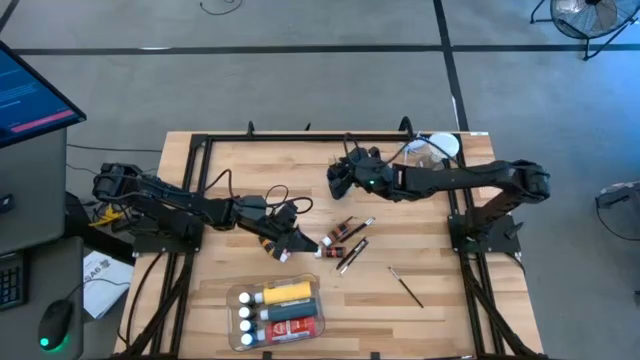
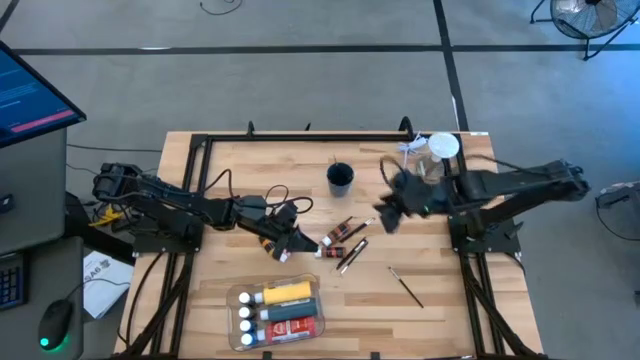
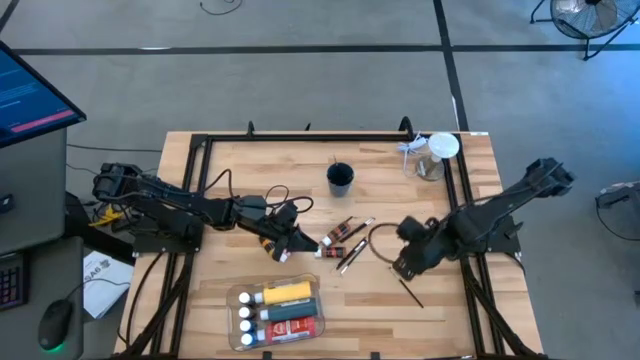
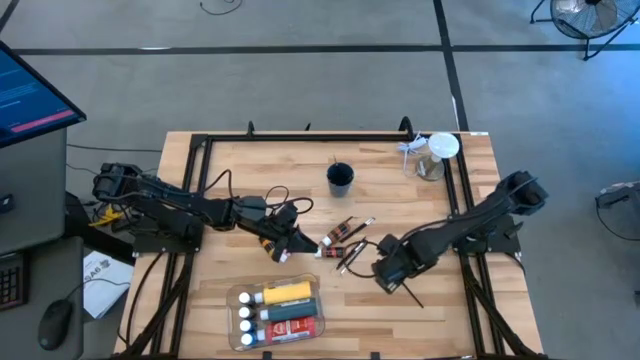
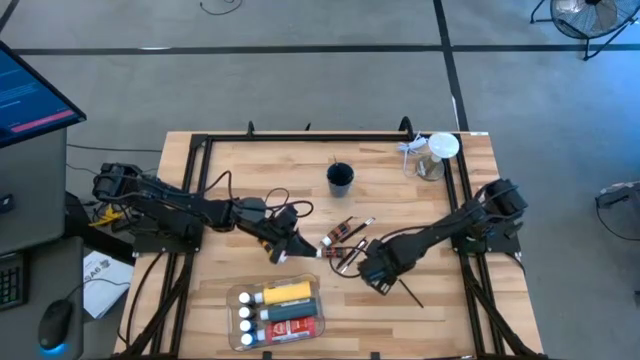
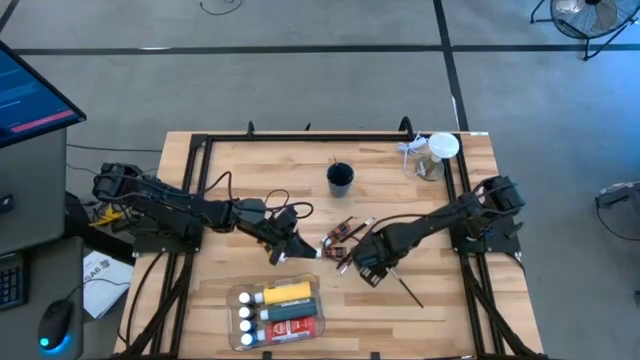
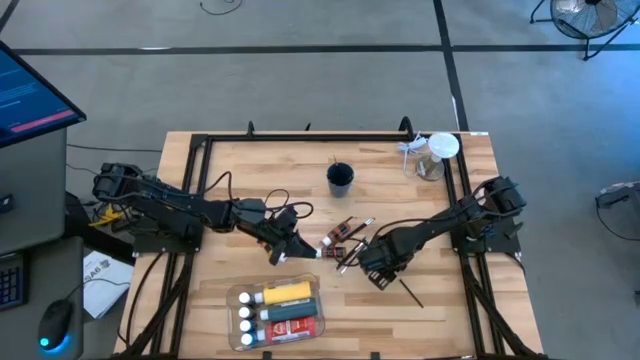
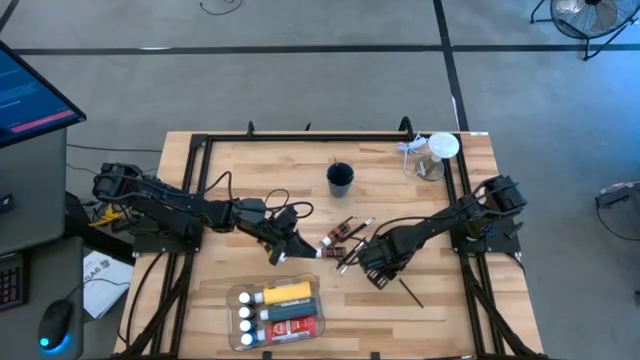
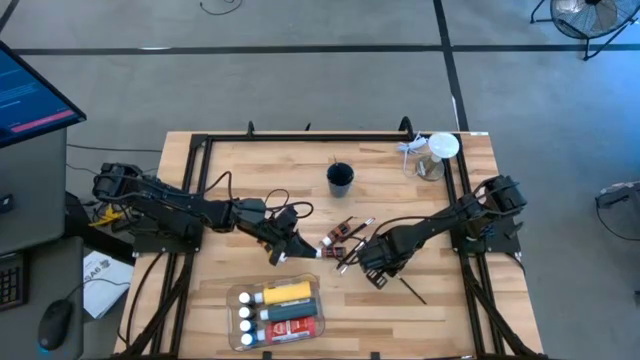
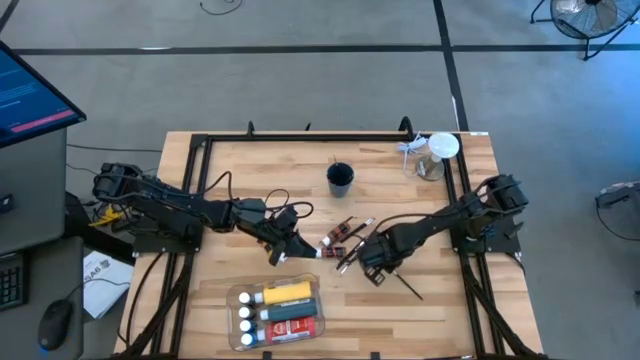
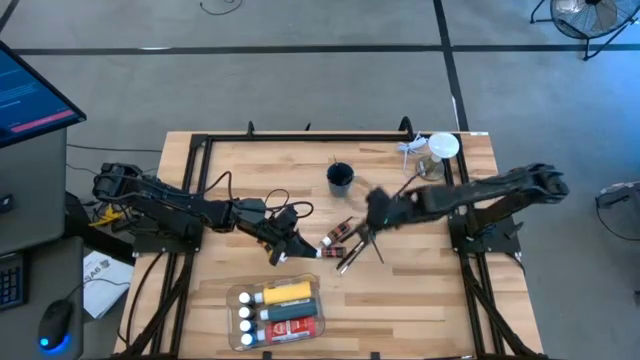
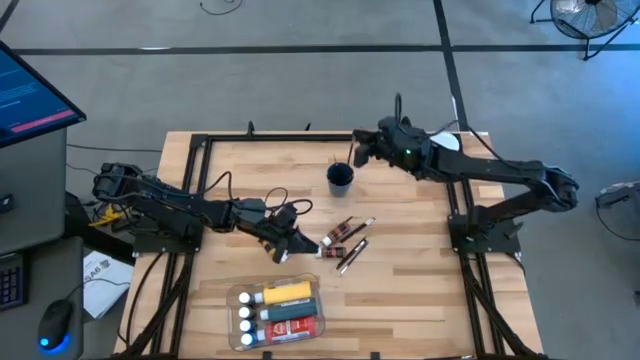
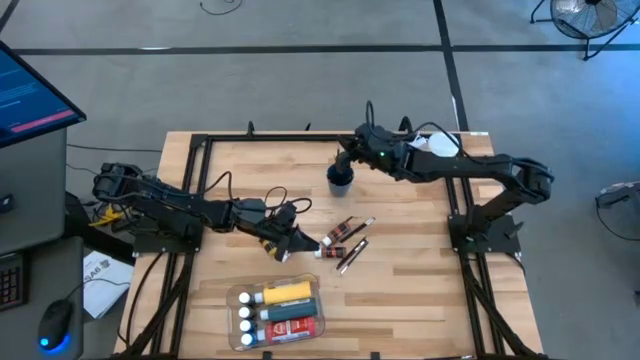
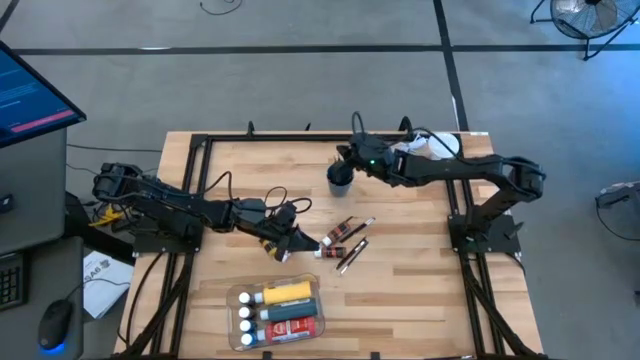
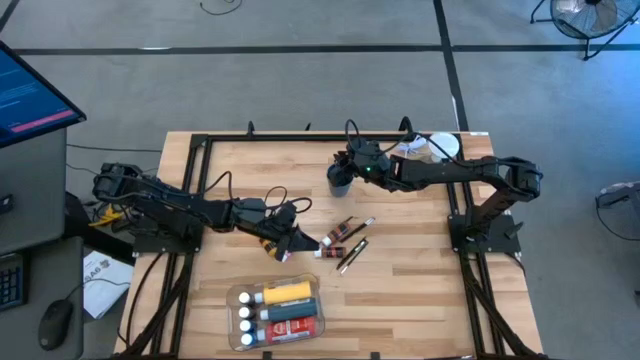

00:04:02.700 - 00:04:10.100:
Task: Pick & Place Paint Supplies
Put the paint brush into the blue cup

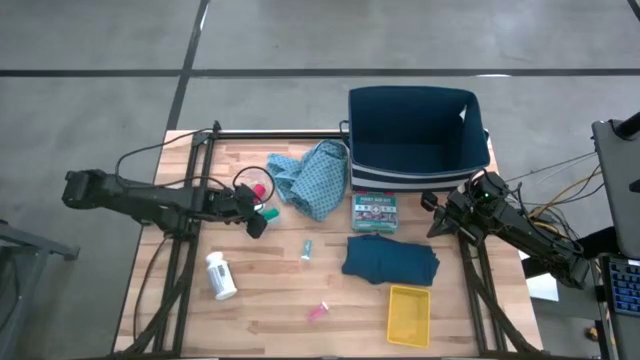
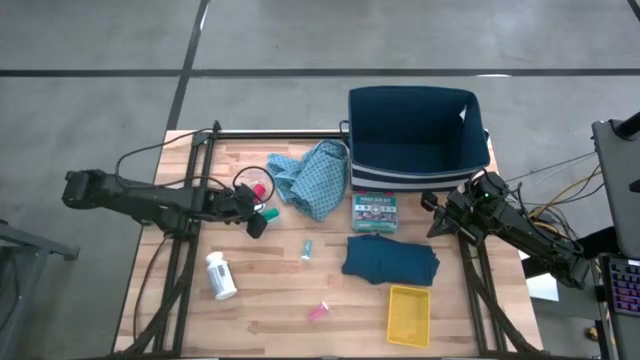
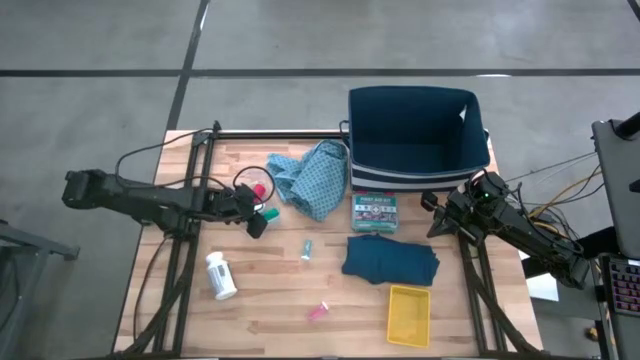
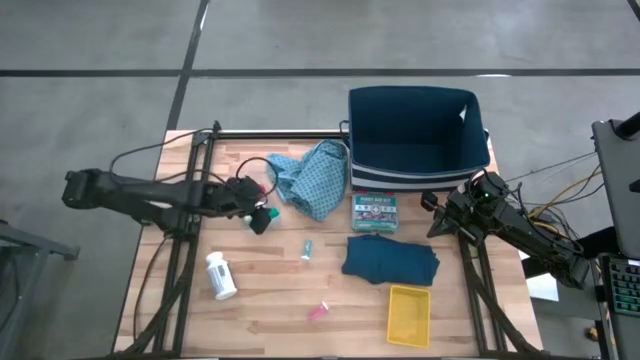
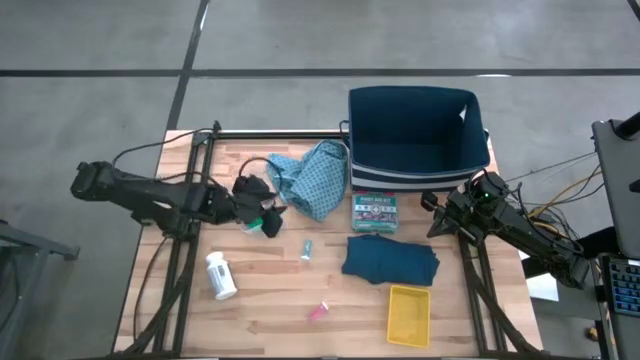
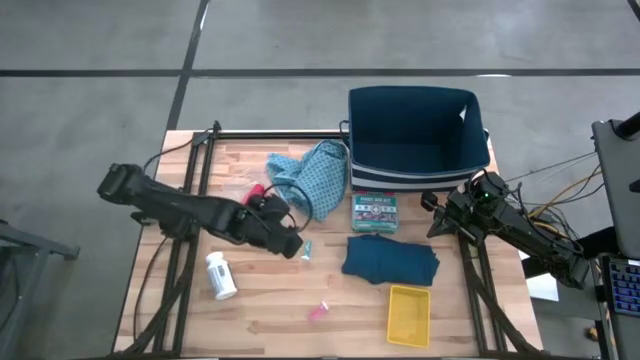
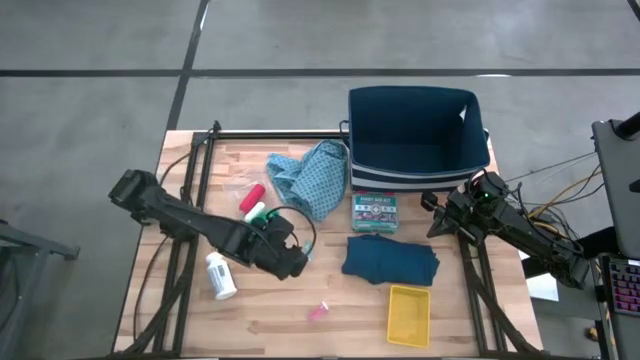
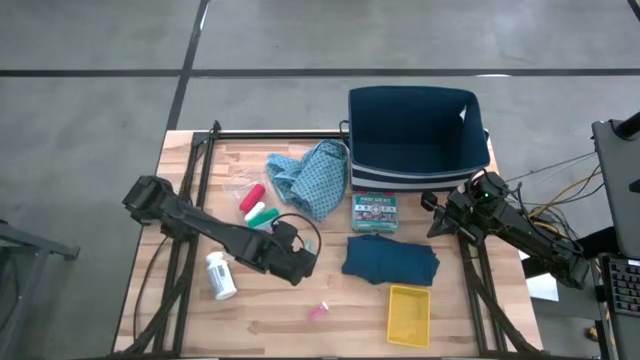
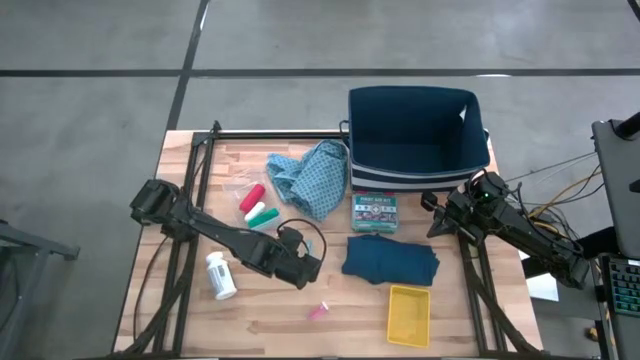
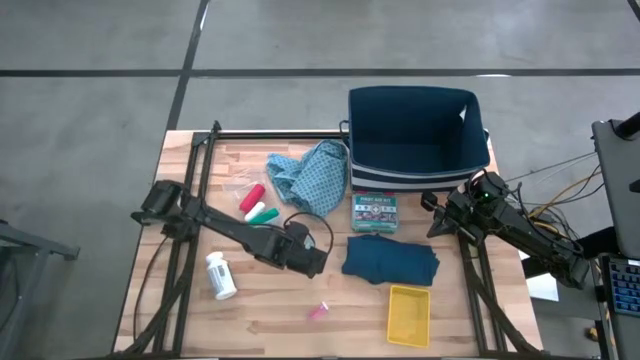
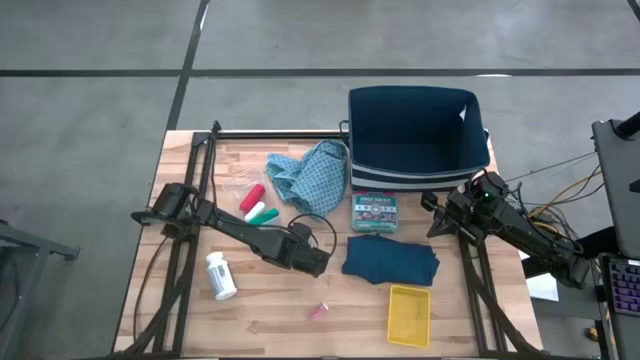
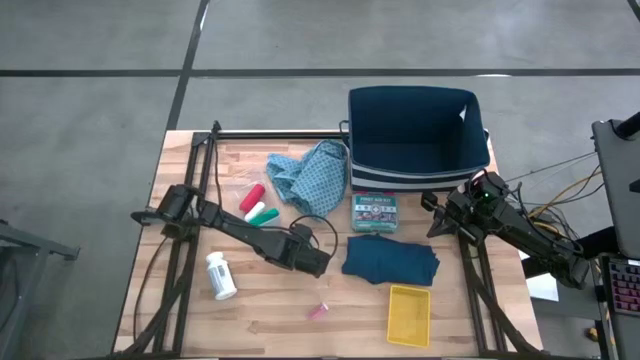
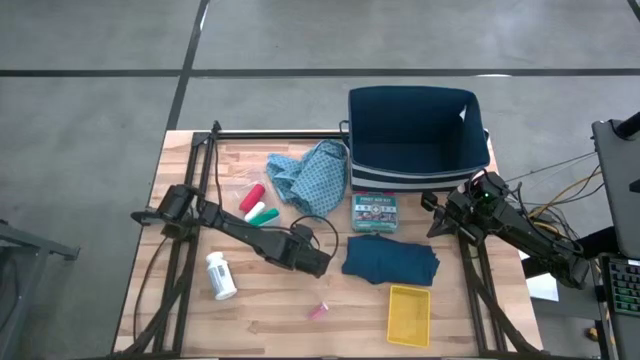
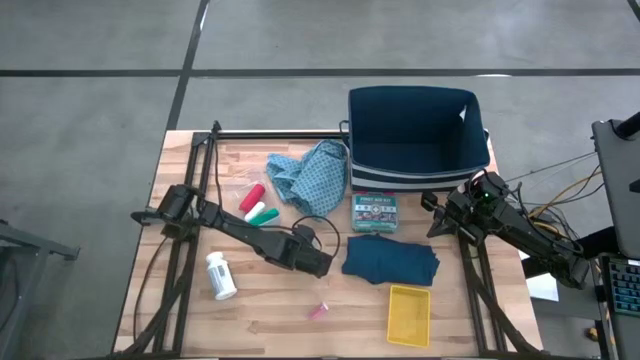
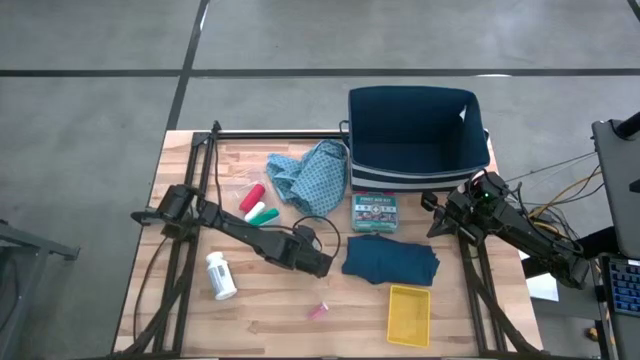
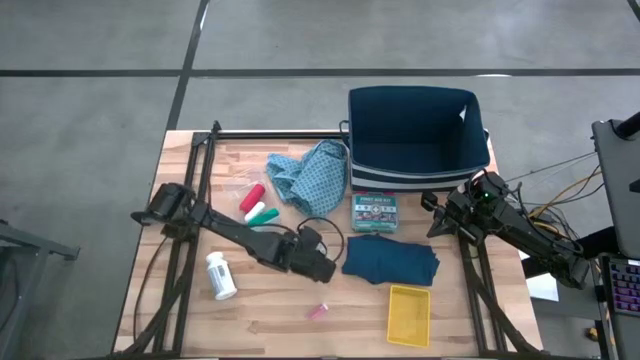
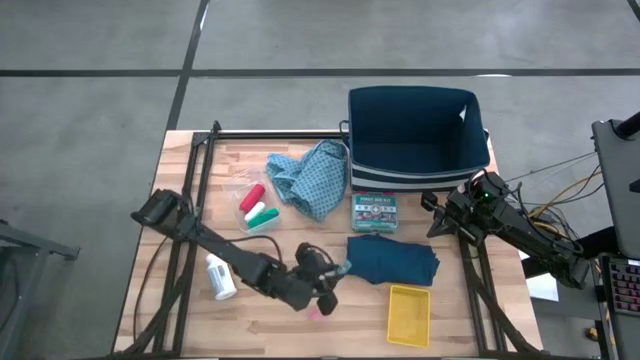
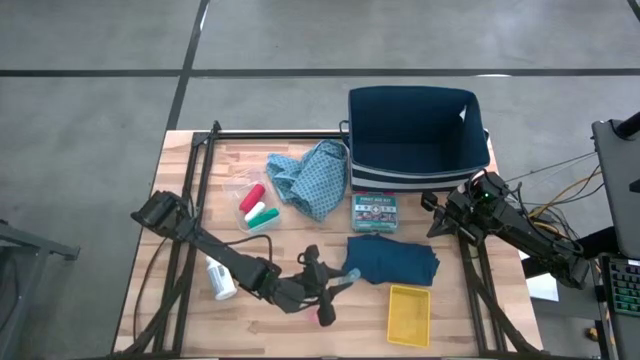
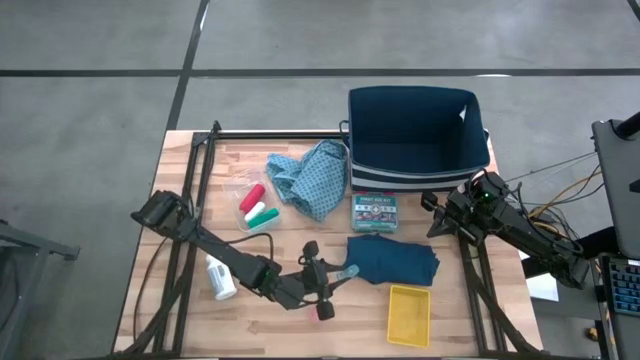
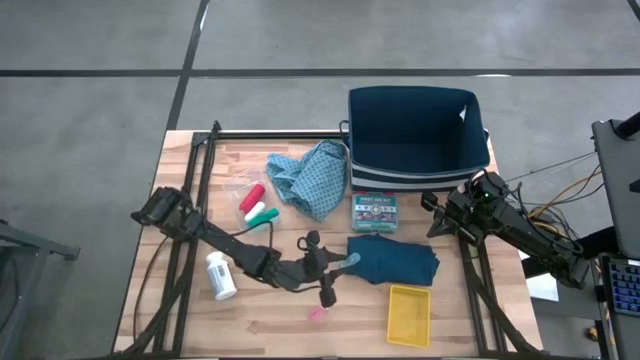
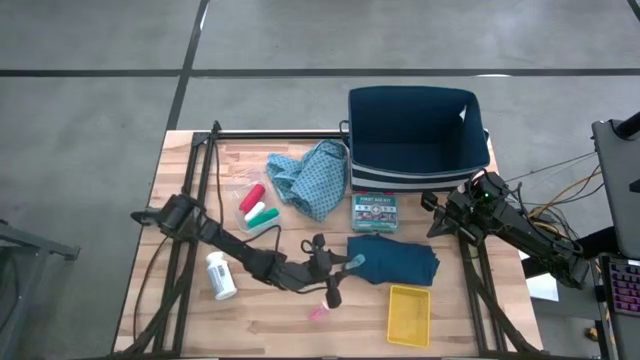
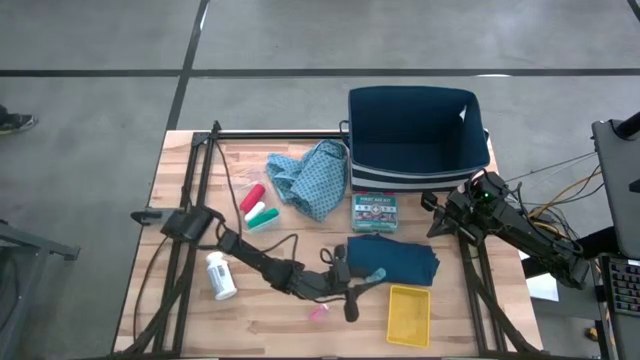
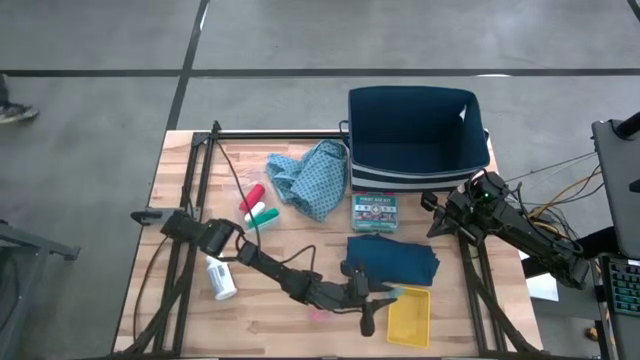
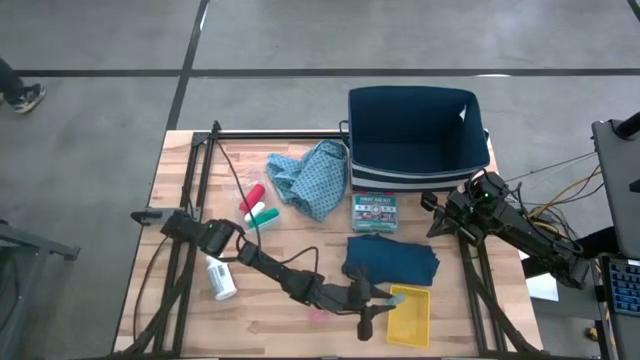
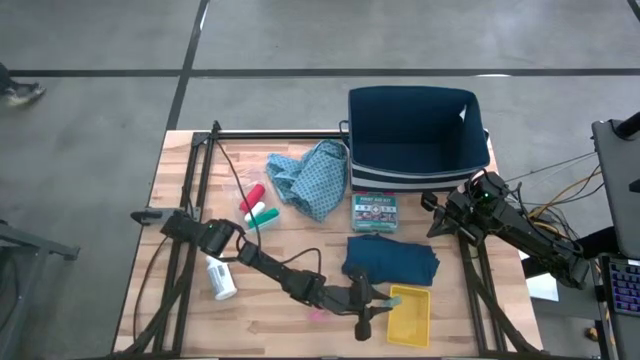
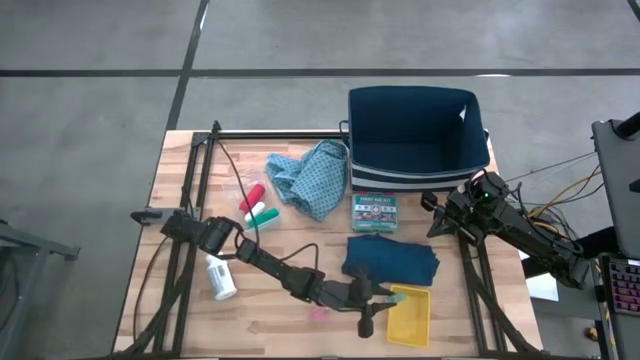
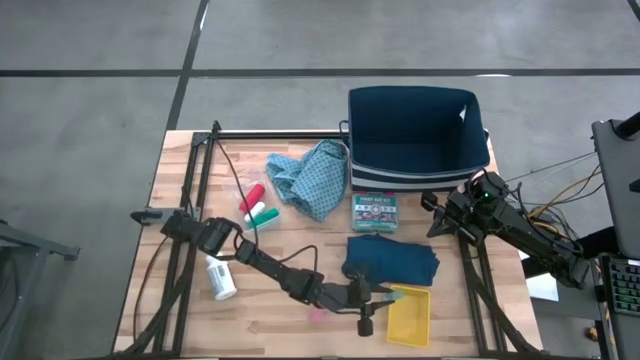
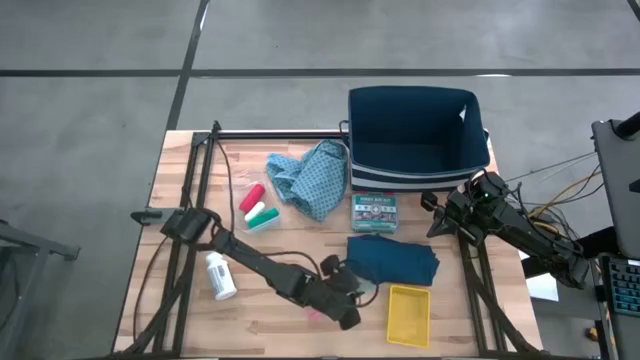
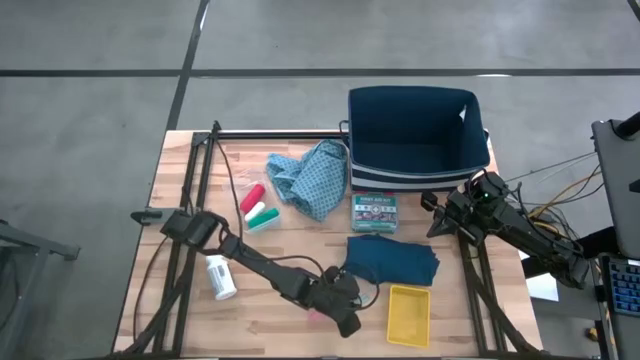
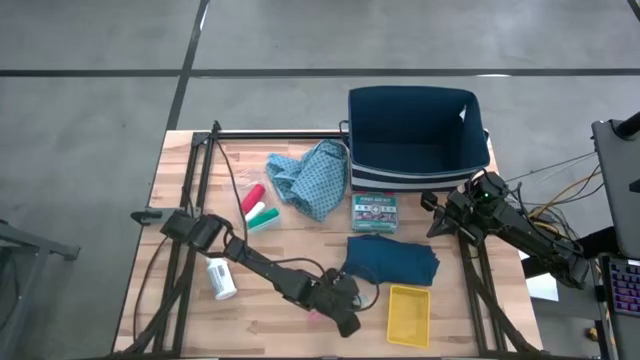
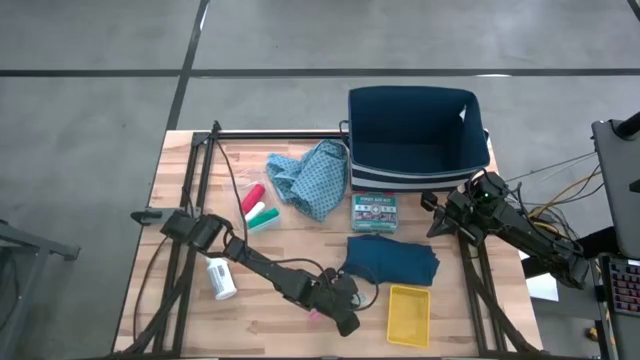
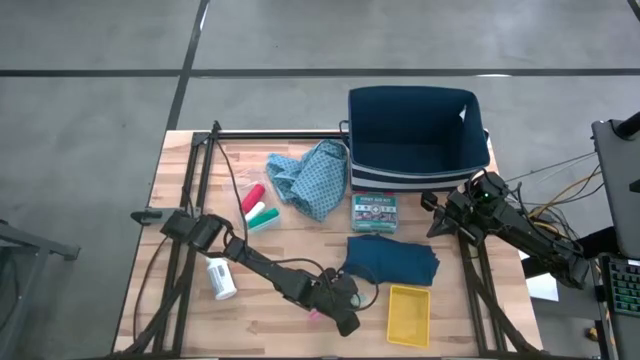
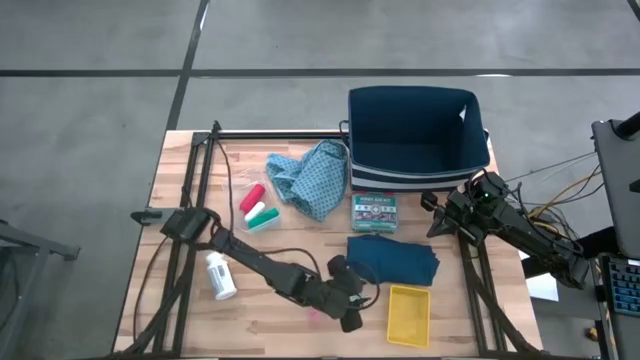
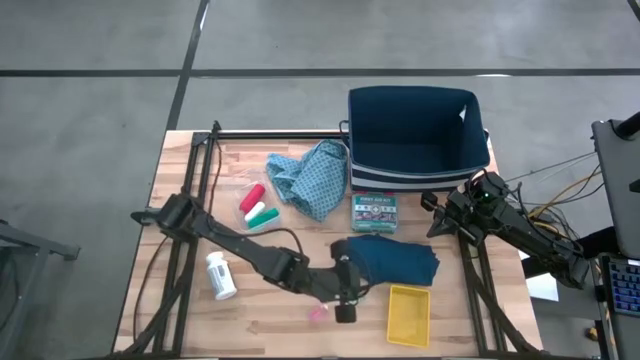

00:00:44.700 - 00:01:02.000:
Task: Pick & place medical supplies in basket/bin
Put the blue pill bottle into the yellow bin
